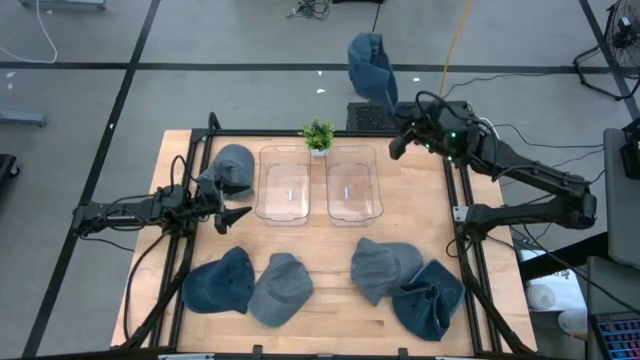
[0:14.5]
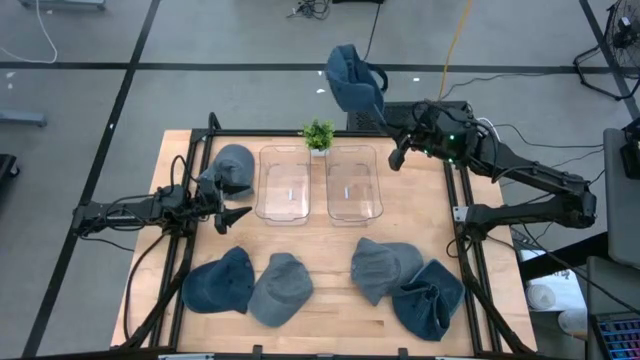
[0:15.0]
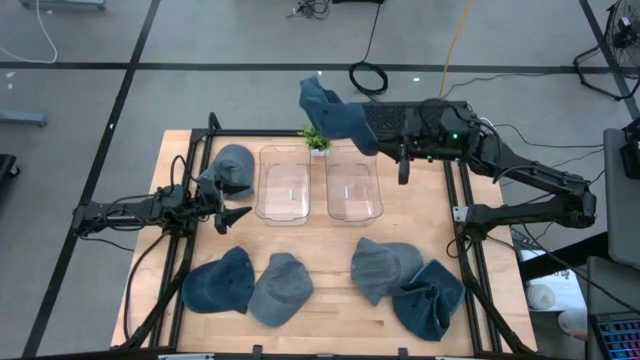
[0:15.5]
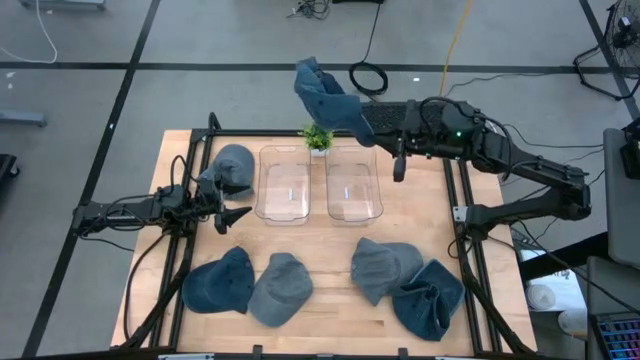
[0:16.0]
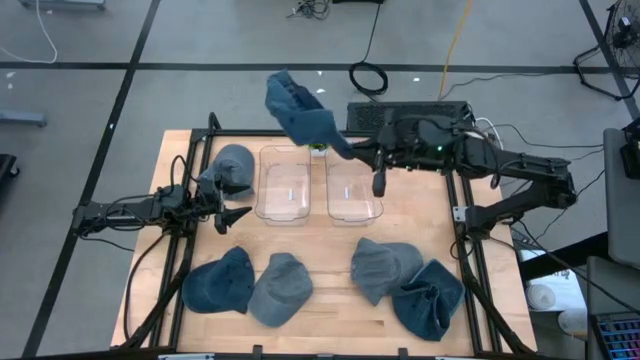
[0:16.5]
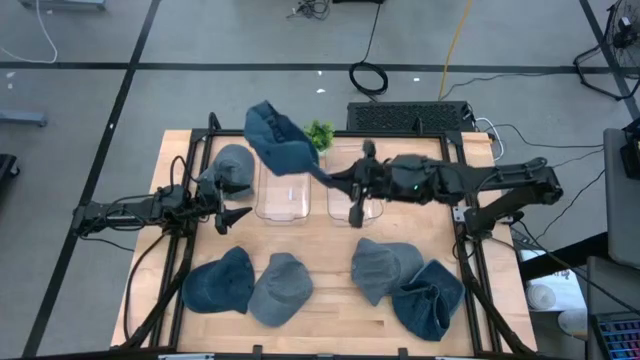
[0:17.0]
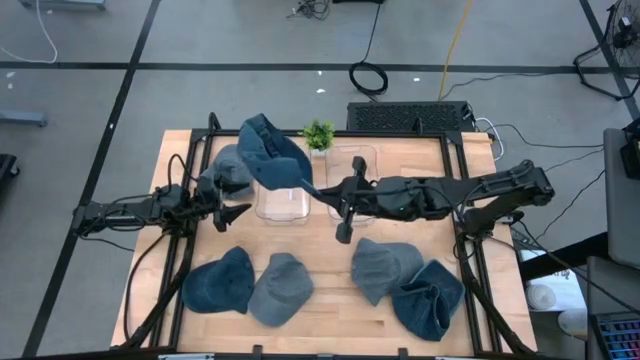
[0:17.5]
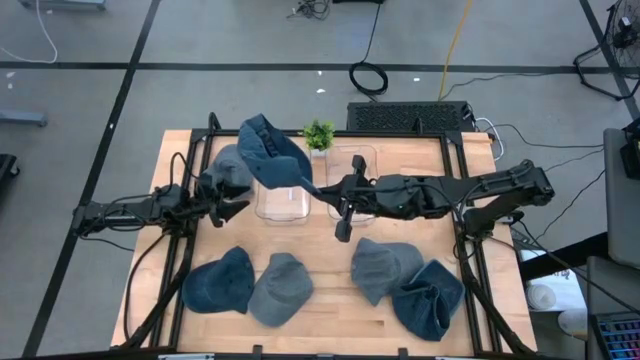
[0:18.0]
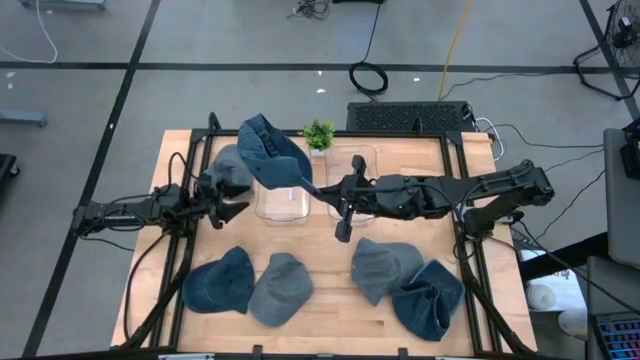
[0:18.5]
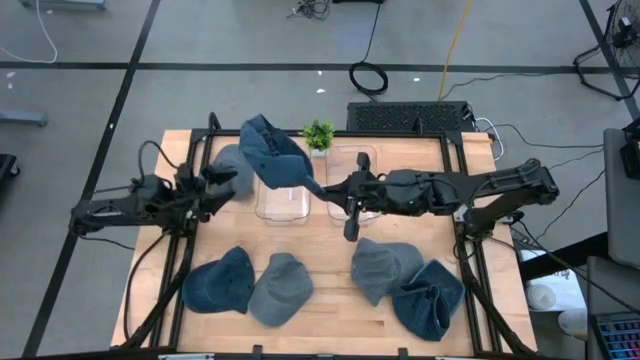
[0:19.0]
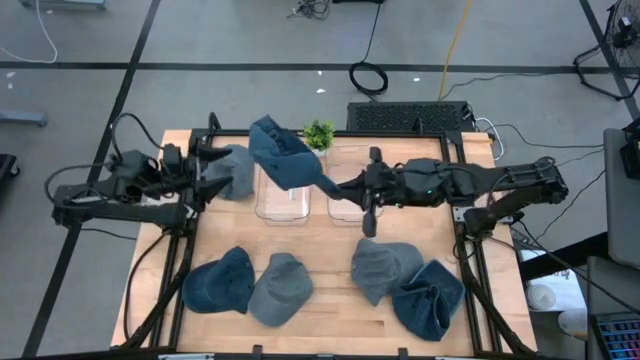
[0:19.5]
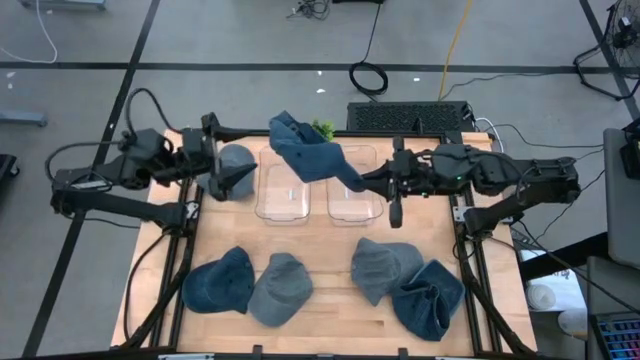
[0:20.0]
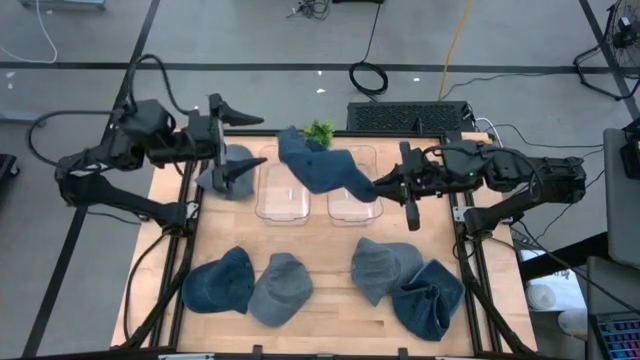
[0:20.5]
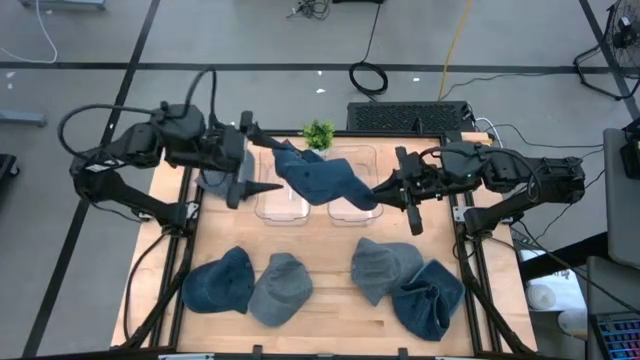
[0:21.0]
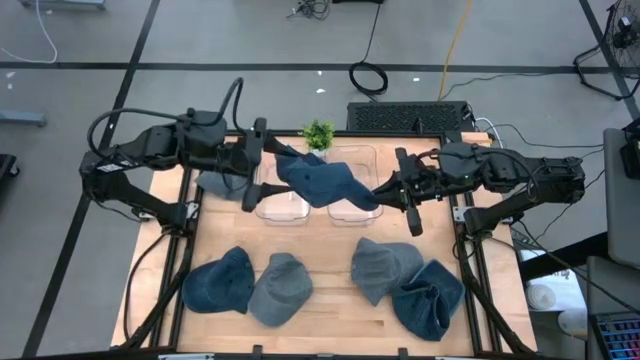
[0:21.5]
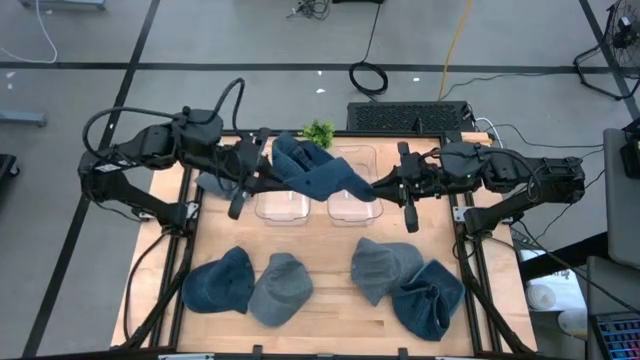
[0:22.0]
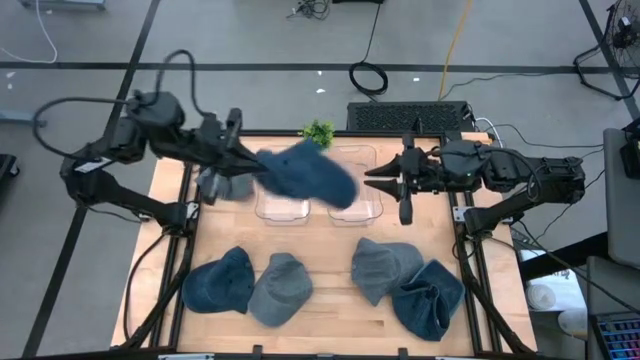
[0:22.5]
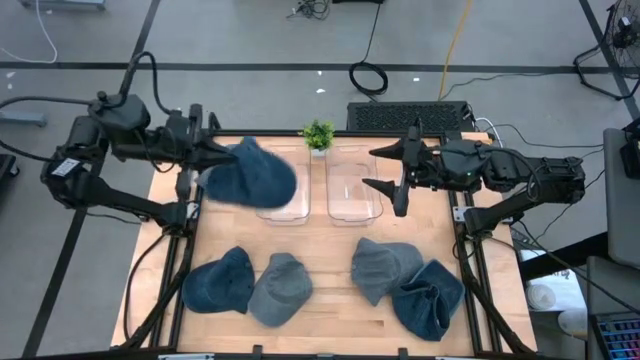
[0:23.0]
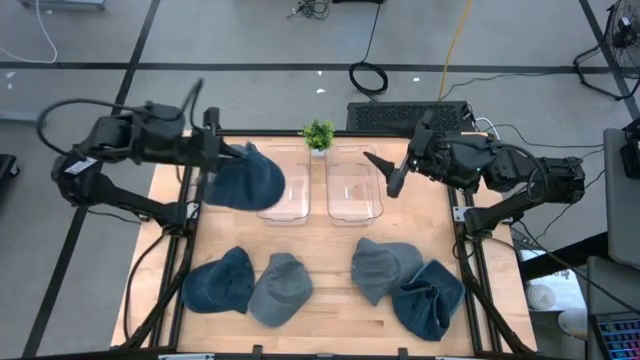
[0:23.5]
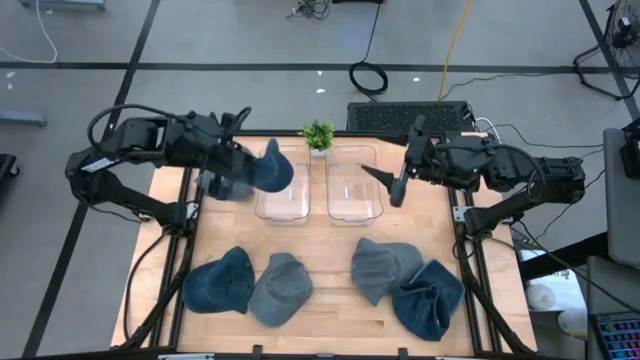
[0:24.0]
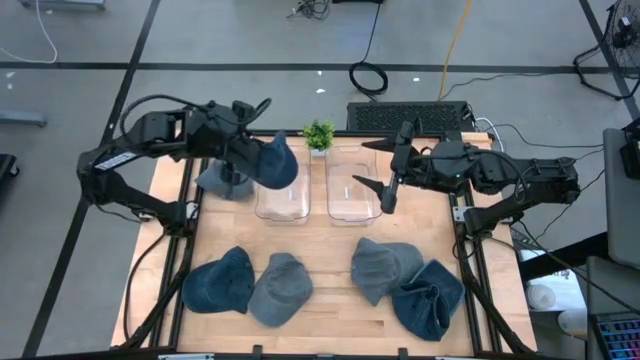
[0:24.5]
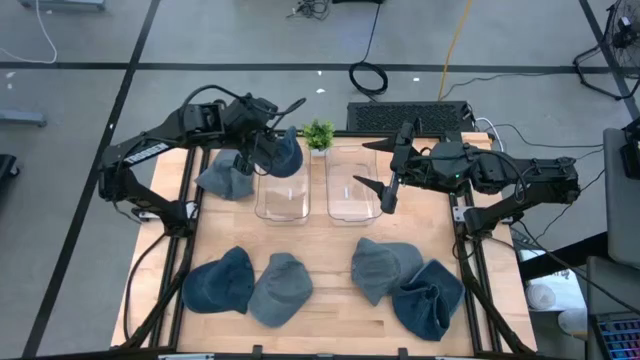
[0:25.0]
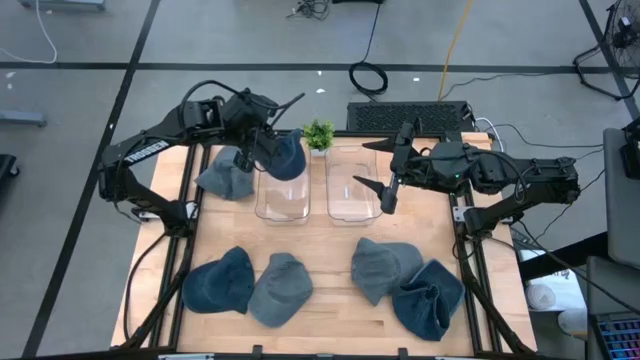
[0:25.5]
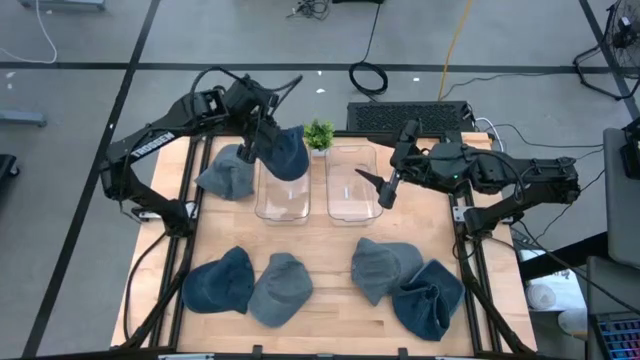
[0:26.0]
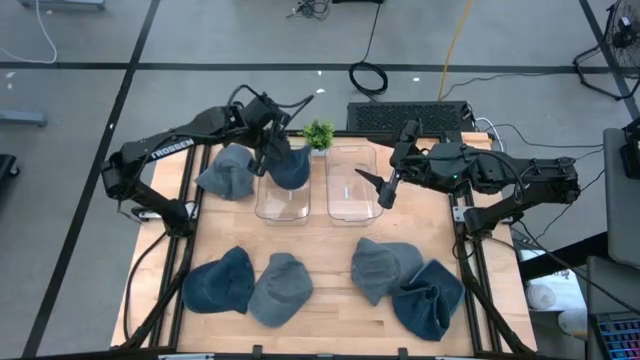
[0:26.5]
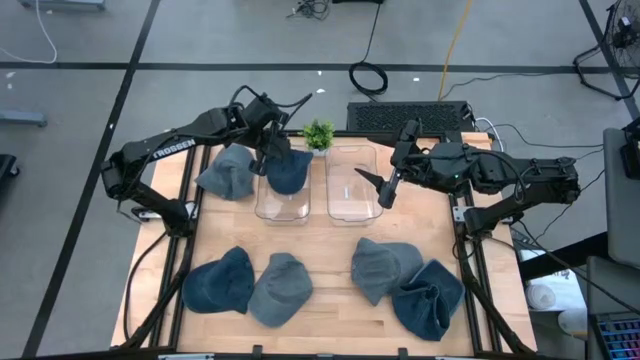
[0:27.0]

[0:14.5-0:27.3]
Task: Pick & Place hat
Put the top blue cap into the left transparent bin

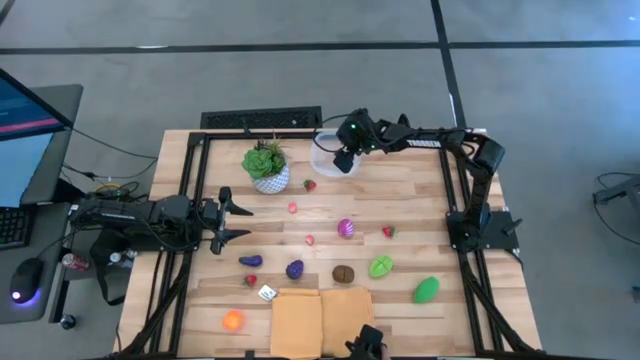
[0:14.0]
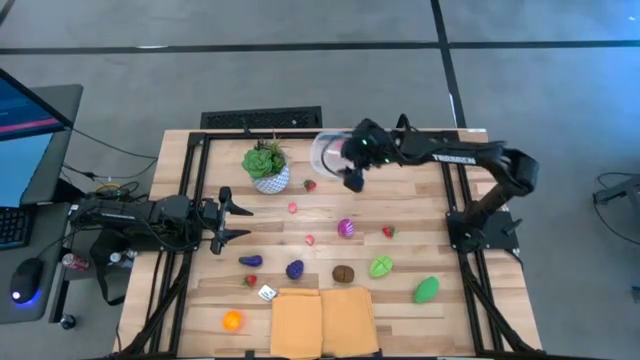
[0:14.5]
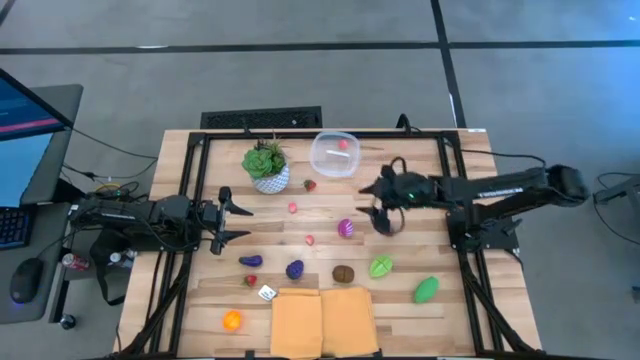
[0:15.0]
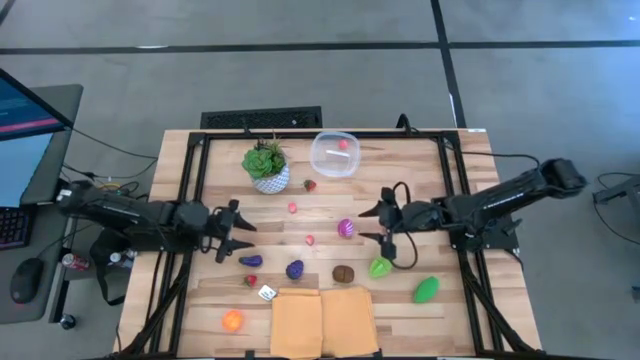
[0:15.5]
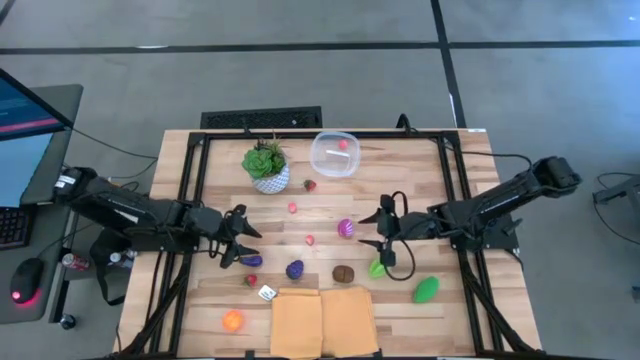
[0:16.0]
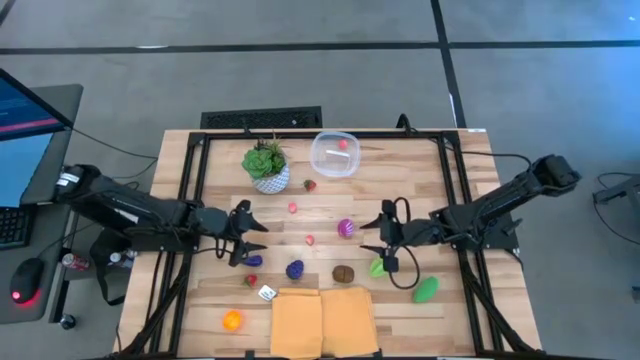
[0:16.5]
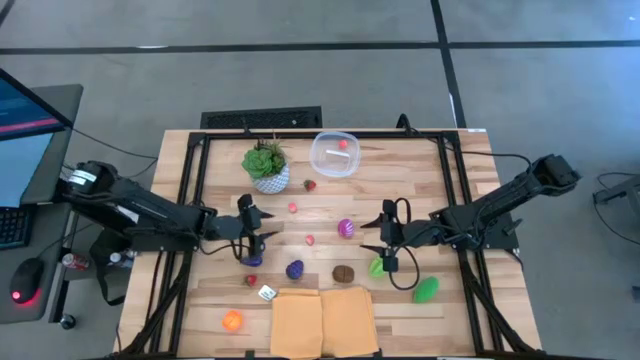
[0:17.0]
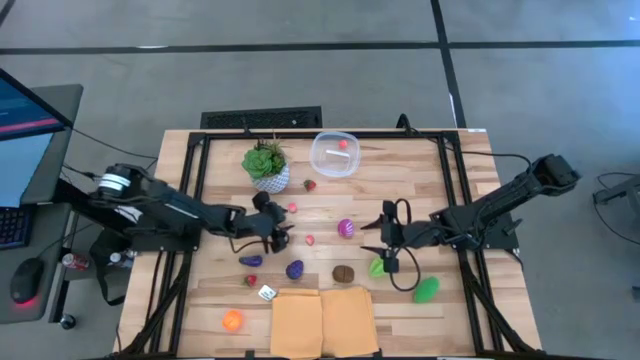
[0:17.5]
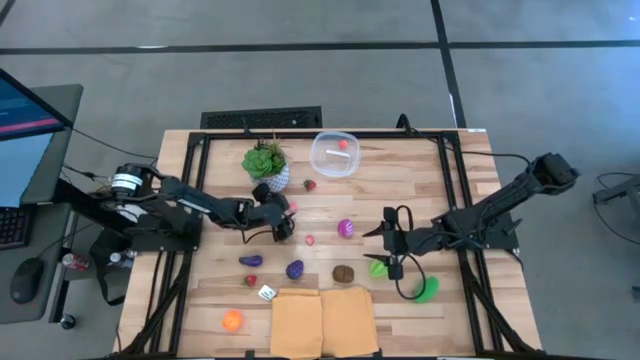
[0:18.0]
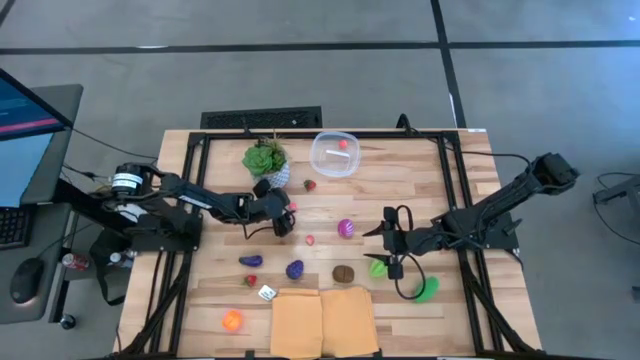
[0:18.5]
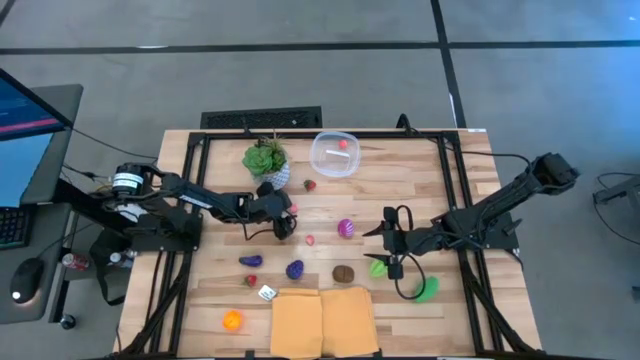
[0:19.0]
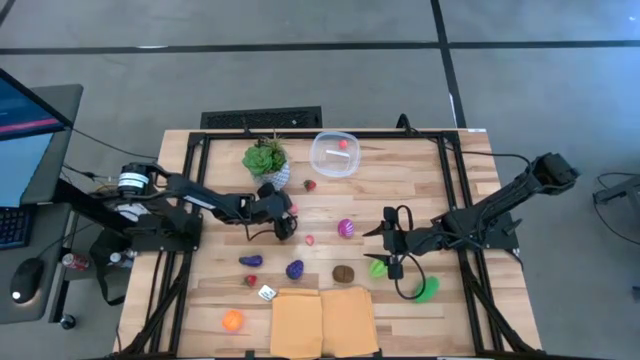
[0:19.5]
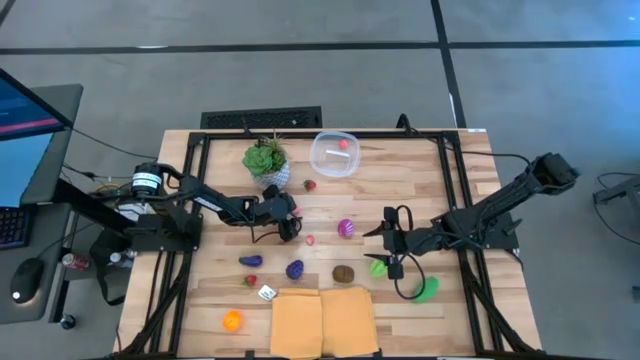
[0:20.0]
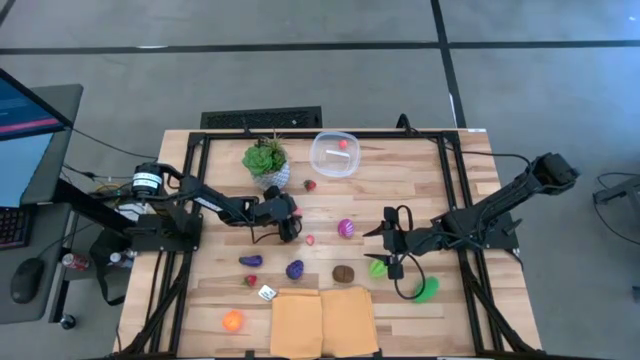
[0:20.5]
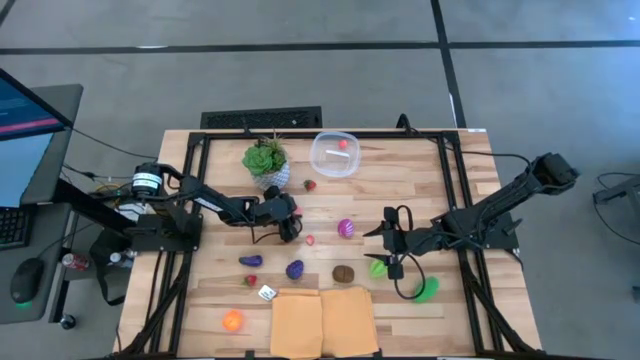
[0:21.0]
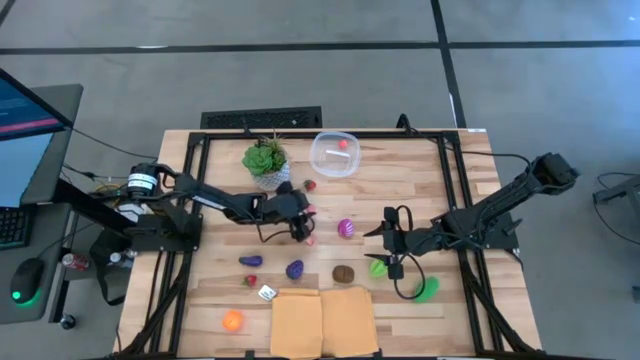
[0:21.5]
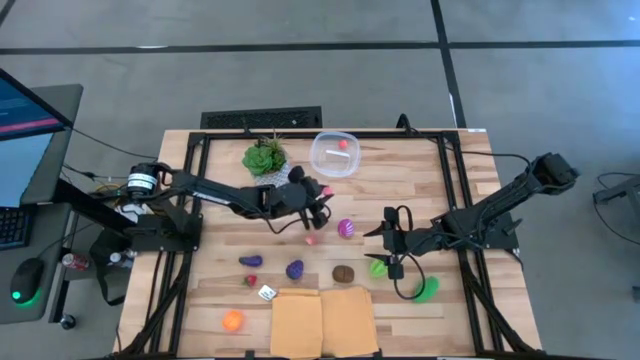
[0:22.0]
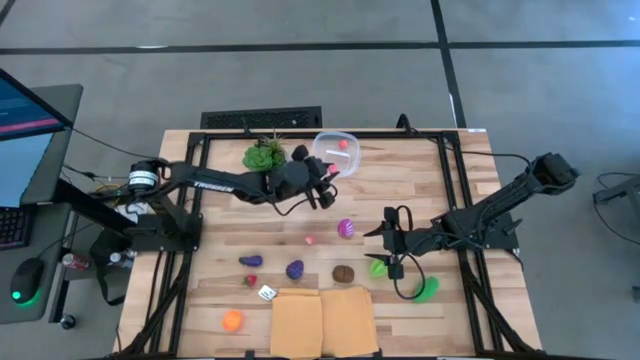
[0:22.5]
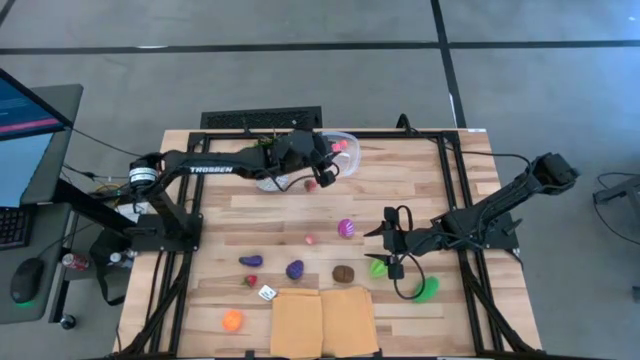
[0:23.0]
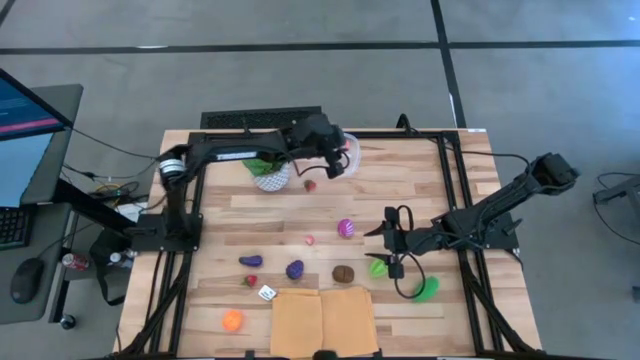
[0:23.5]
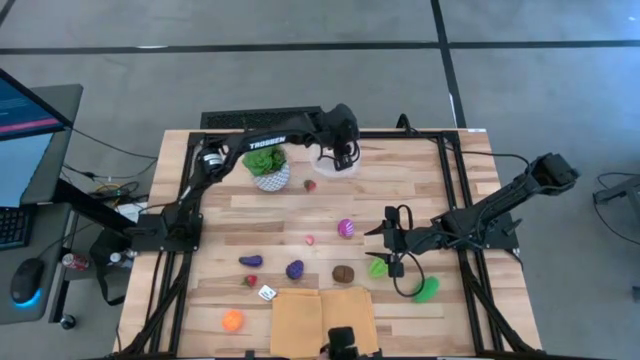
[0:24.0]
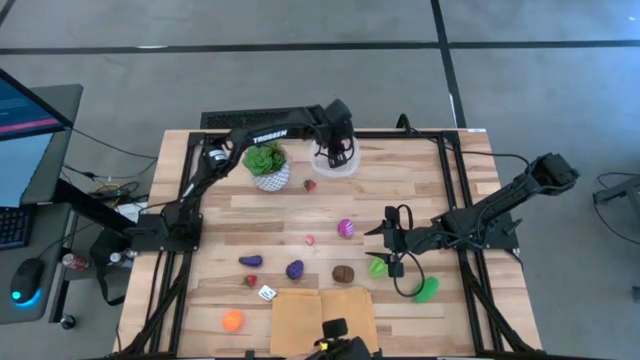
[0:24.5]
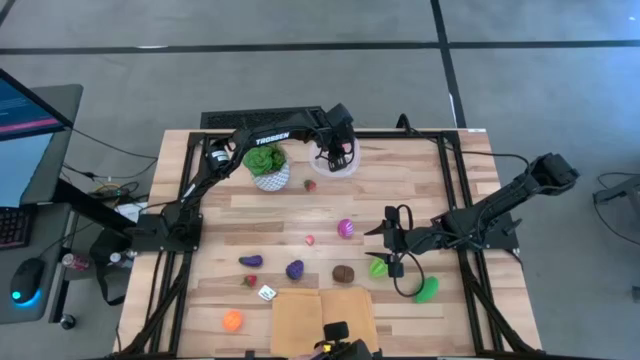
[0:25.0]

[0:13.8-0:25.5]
Task: Pick and placing Produce into tupperware
Put the top peach into the transparent bin
